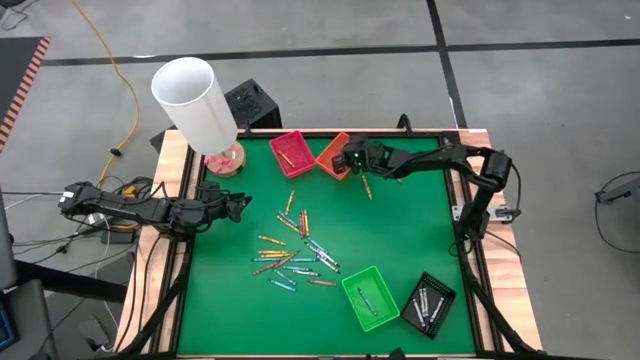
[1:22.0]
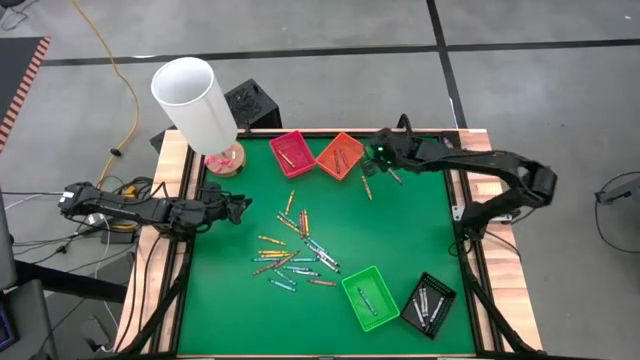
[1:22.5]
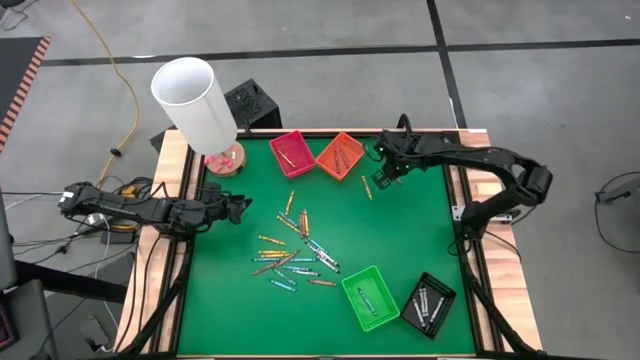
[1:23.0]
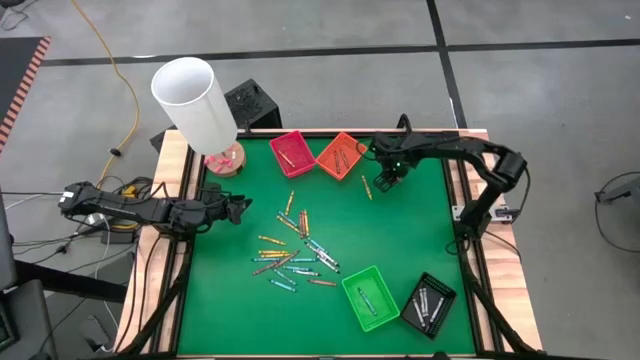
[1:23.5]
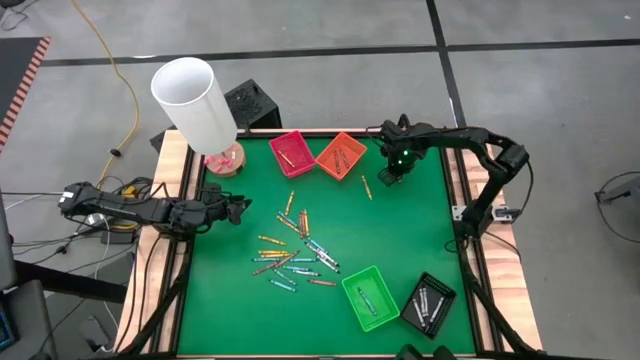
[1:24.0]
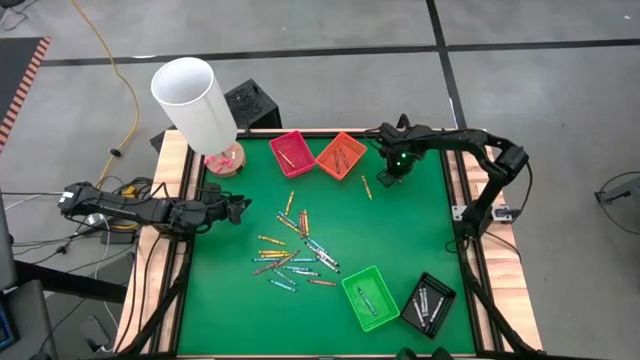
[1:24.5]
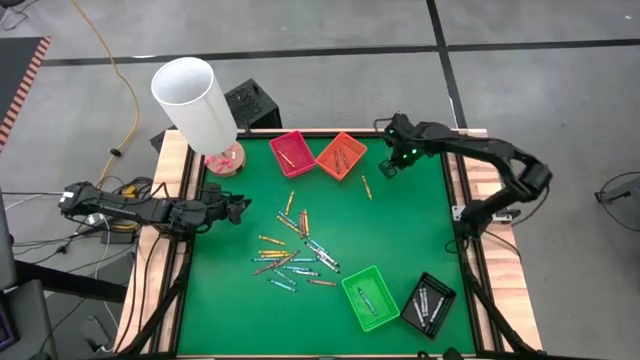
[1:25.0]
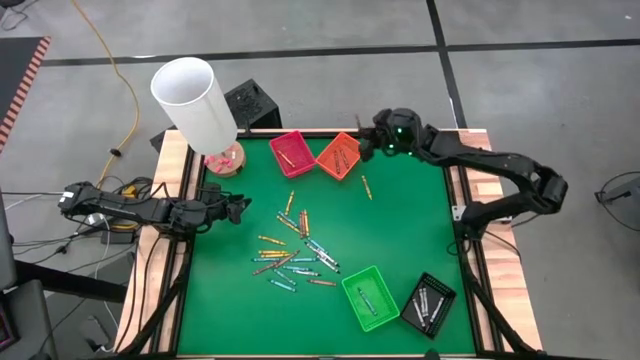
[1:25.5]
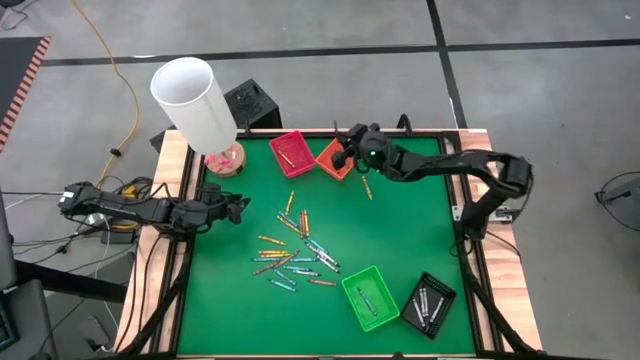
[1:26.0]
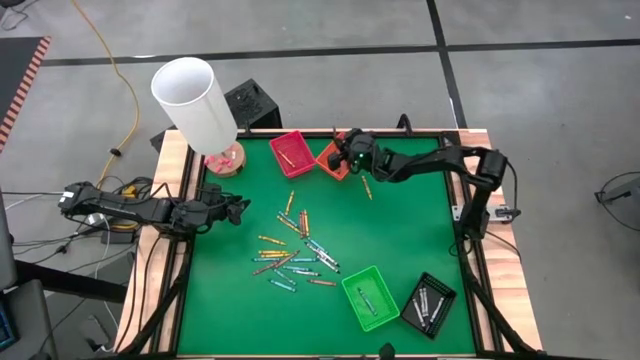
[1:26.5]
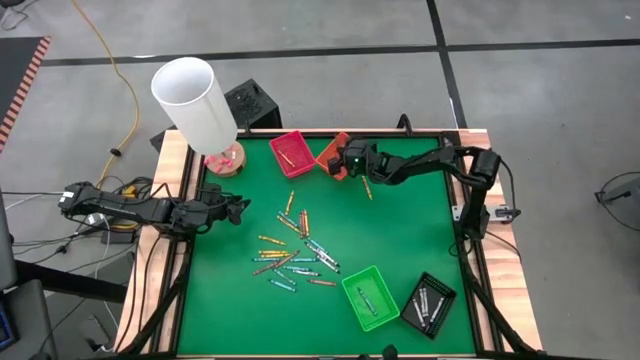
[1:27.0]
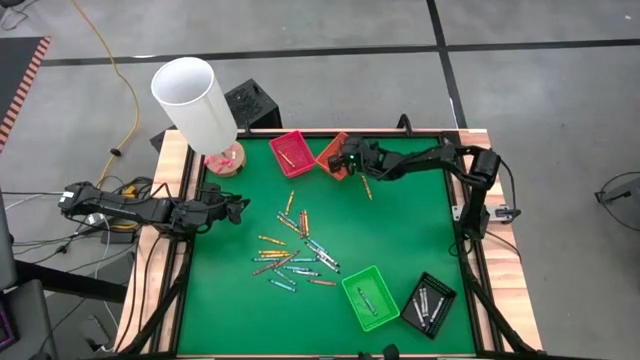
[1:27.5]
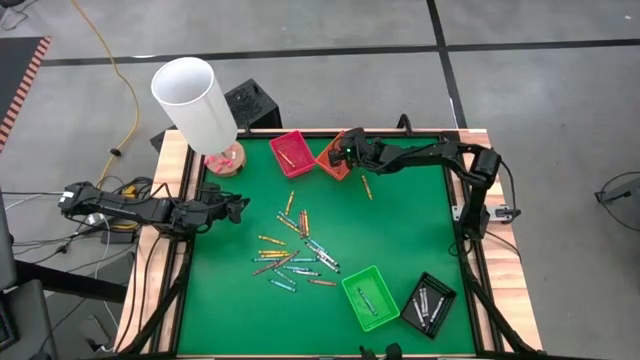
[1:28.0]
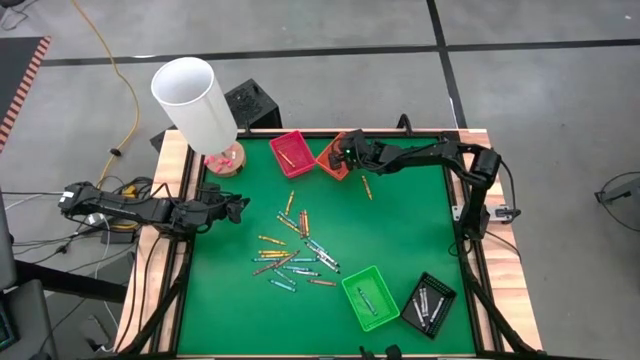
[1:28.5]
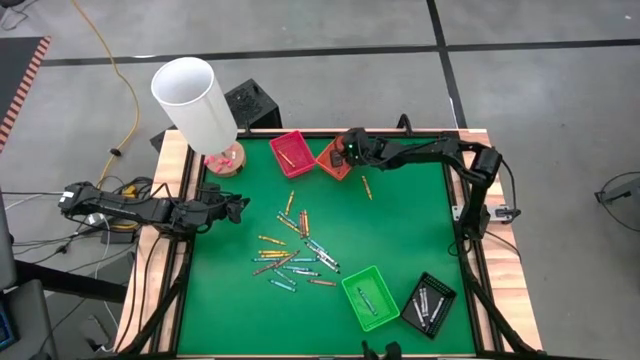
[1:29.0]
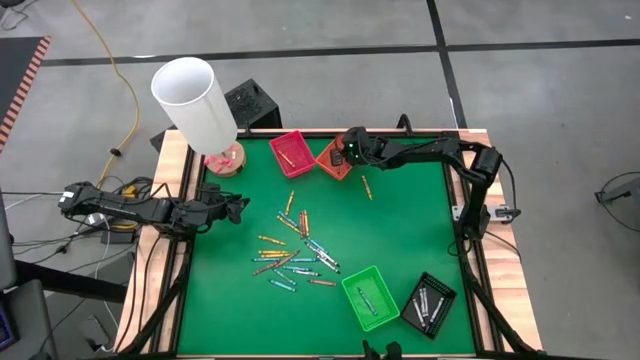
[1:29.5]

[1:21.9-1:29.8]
Task: Sort crayons
Put the brown crayon into the orange bin

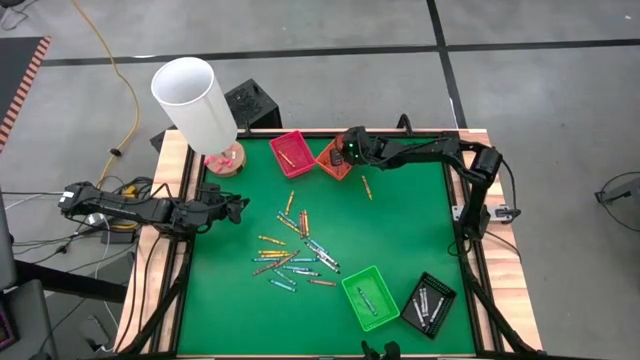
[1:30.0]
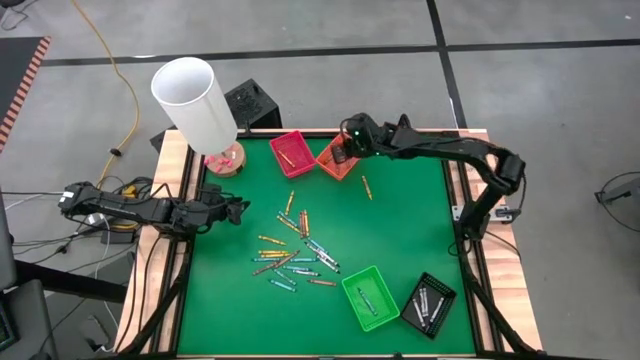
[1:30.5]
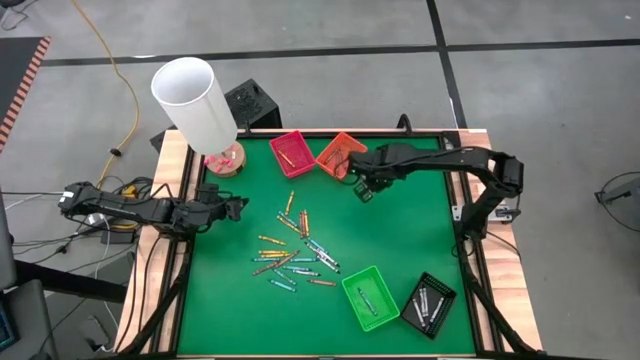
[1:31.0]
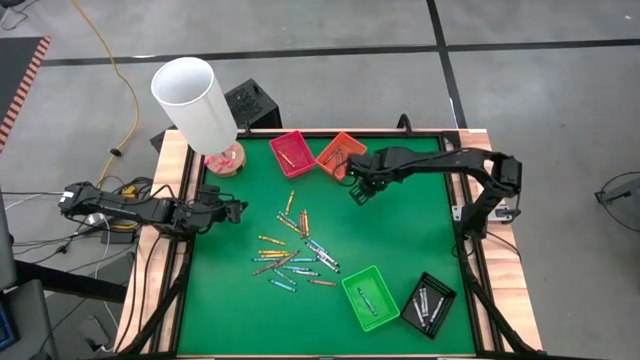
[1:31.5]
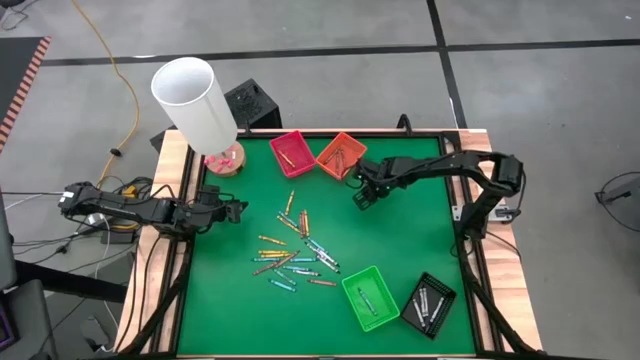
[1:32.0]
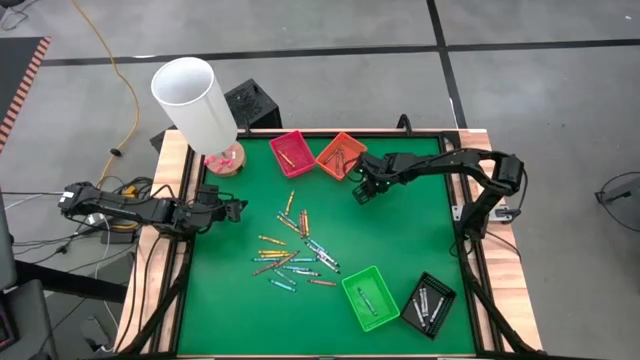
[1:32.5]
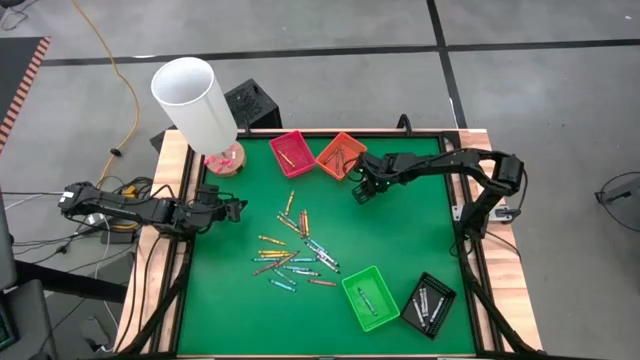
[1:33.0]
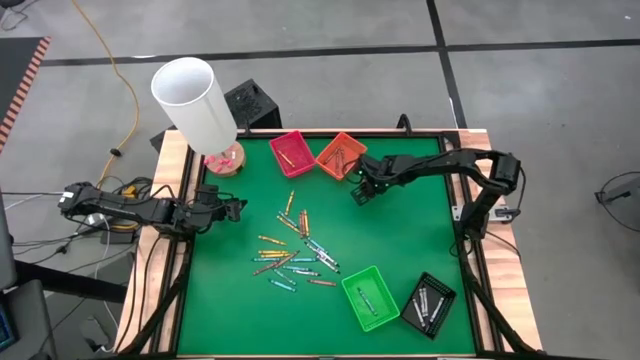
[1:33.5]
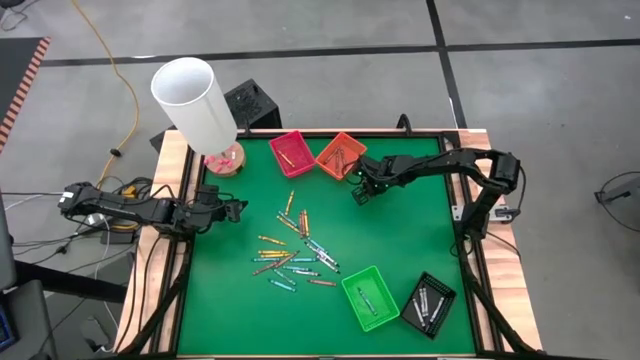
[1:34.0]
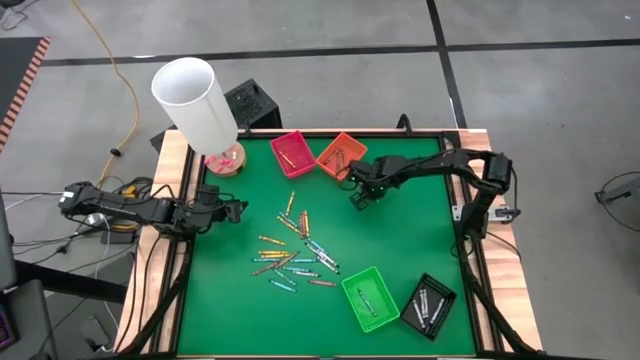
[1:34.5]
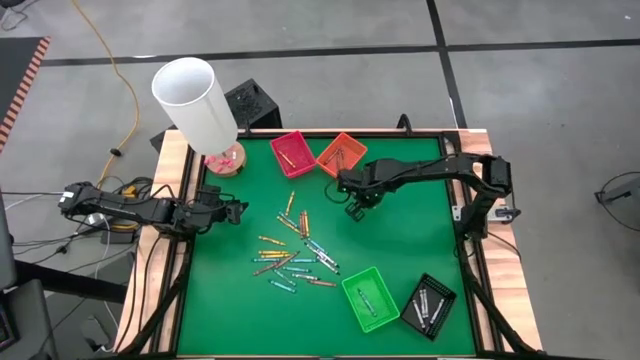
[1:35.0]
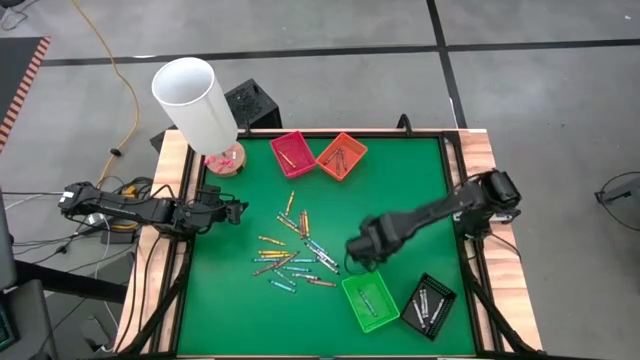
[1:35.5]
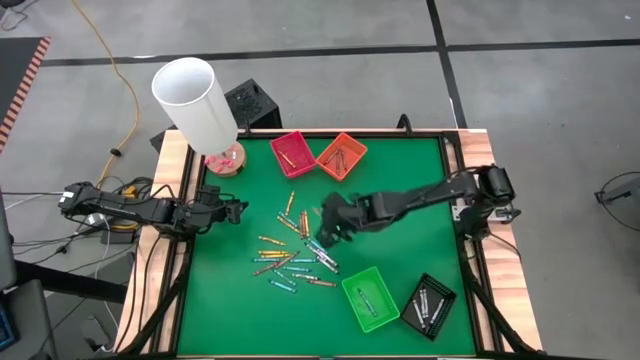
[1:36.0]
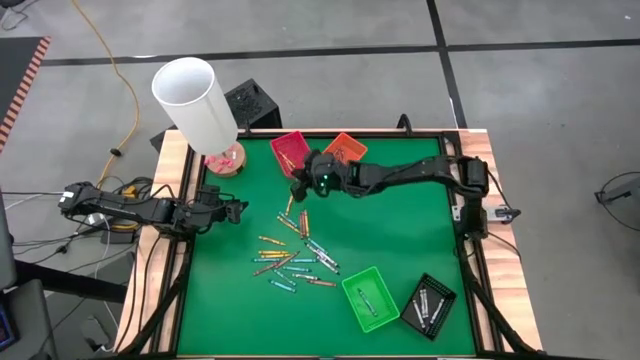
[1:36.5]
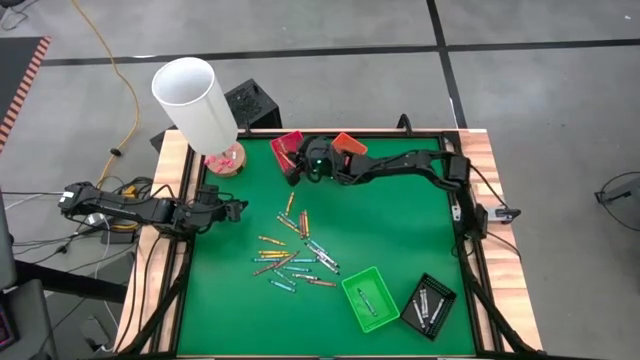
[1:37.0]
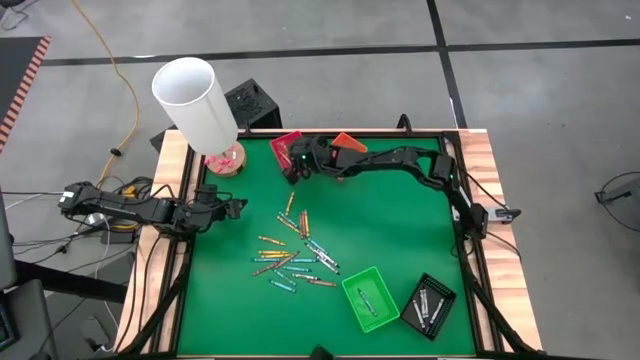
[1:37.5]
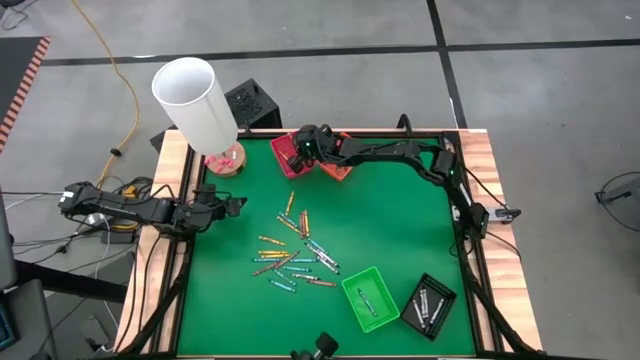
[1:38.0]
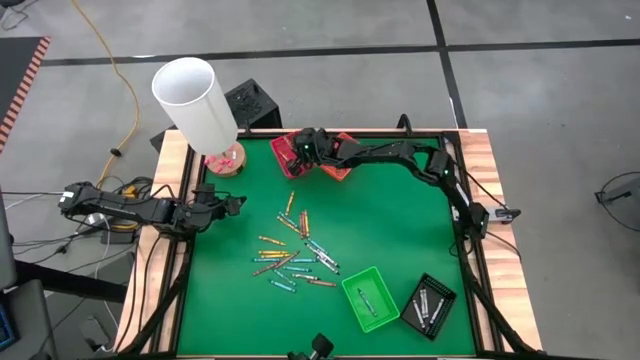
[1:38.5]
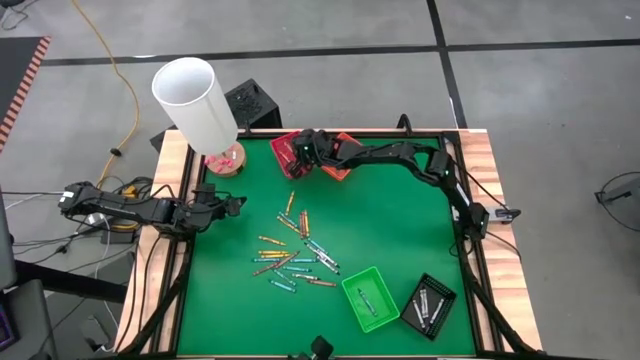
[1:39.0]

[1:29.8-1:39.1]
Put the light green crayon into the red bin

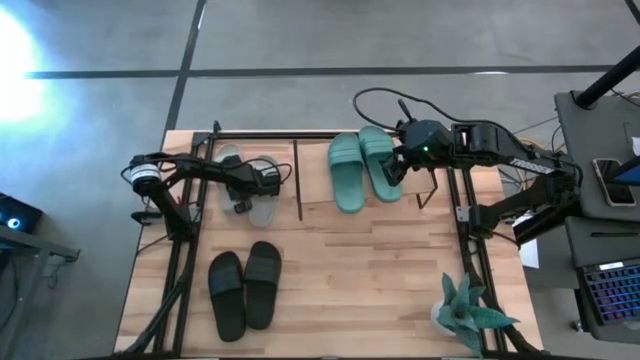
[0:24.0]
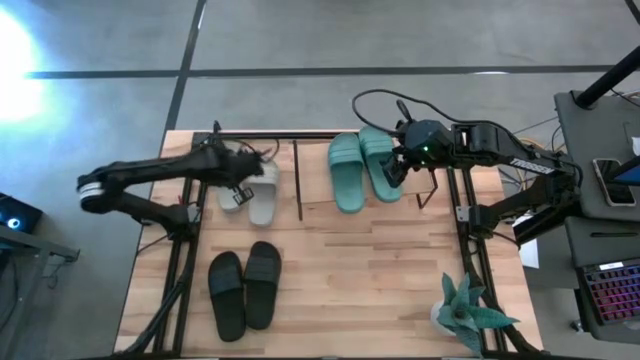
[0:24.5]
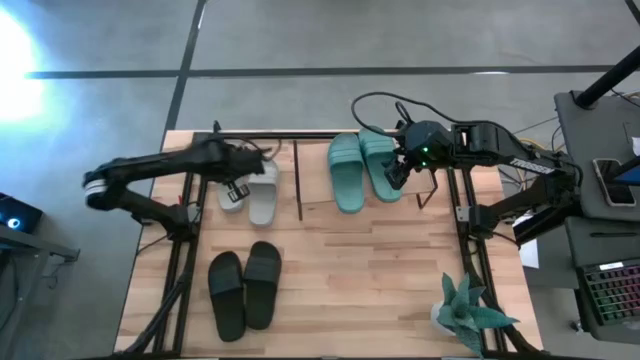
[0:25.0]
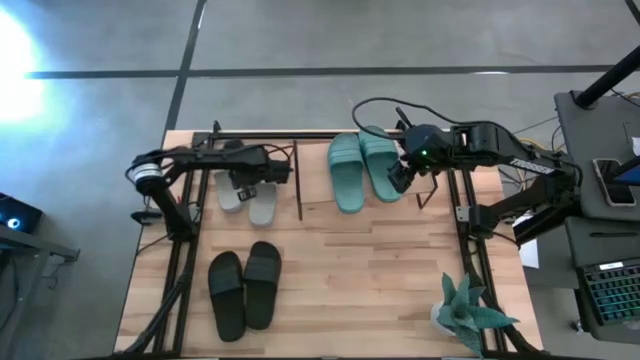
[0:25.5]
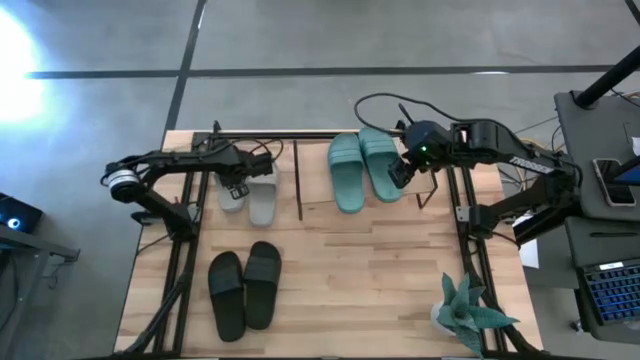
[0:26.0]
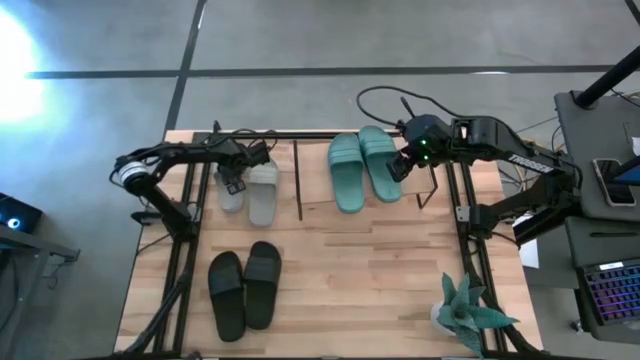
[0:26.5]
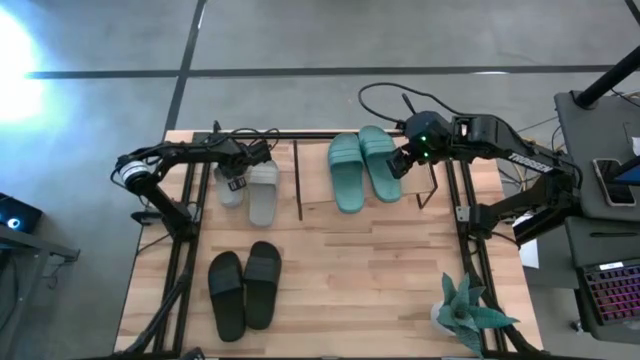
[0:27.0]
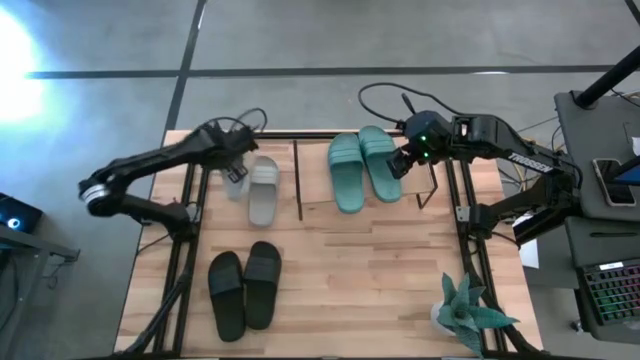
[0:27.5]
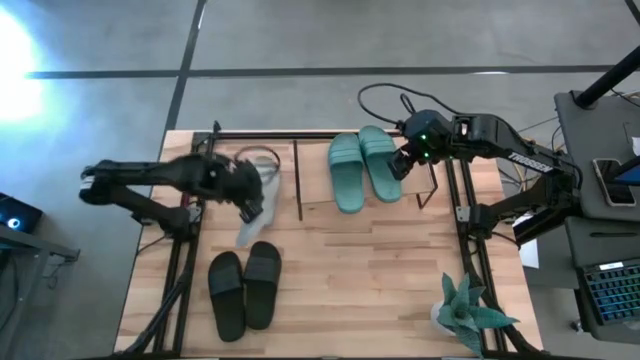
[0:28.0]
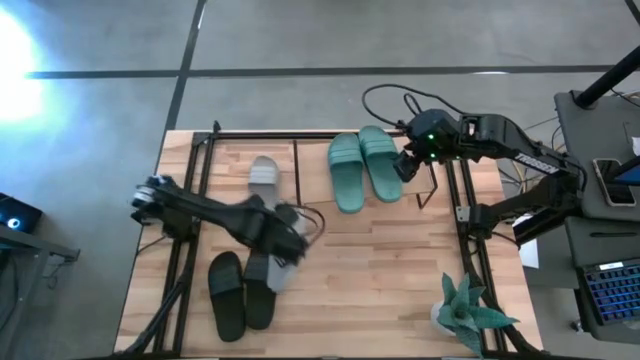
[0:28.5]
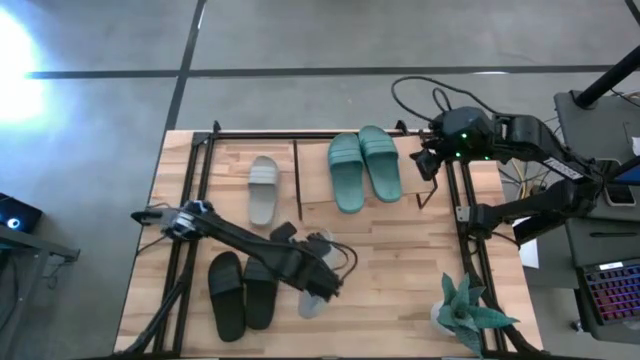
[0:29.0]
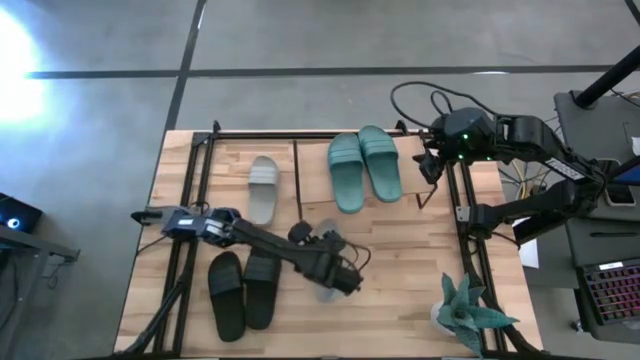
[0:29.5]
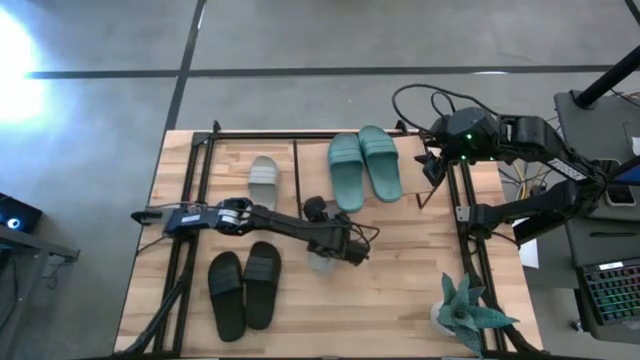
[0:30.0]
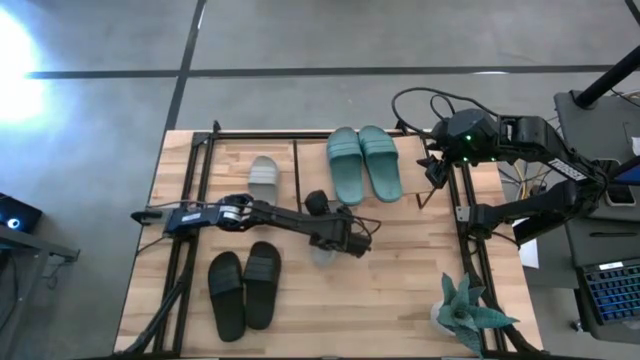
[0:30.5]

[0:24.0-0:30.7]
Task: Pick and place slides into the shelf
Put the left gray slide under the shelf
